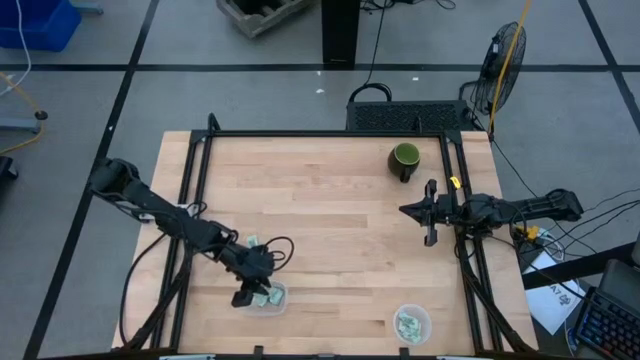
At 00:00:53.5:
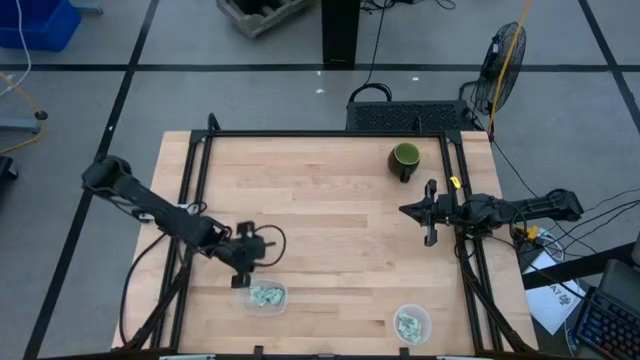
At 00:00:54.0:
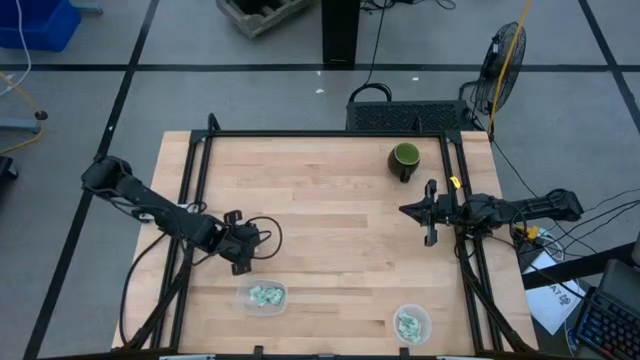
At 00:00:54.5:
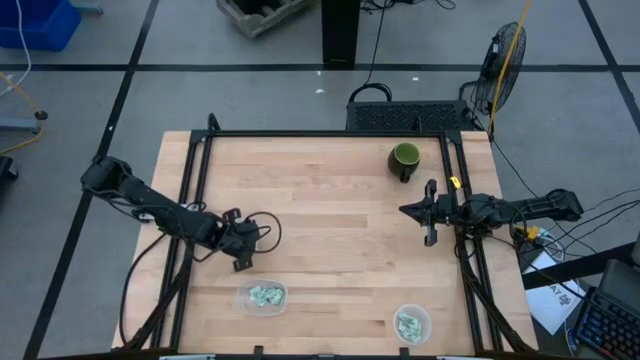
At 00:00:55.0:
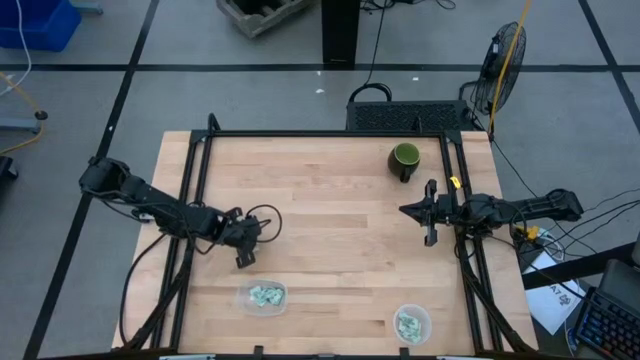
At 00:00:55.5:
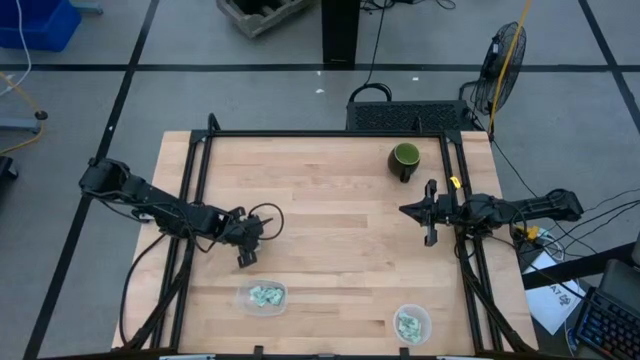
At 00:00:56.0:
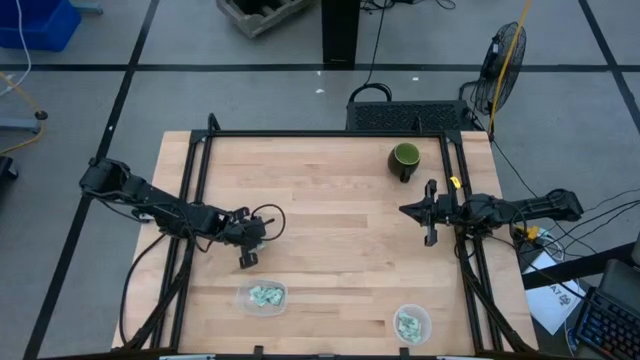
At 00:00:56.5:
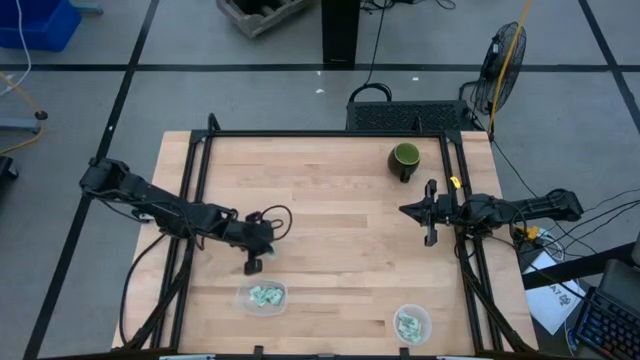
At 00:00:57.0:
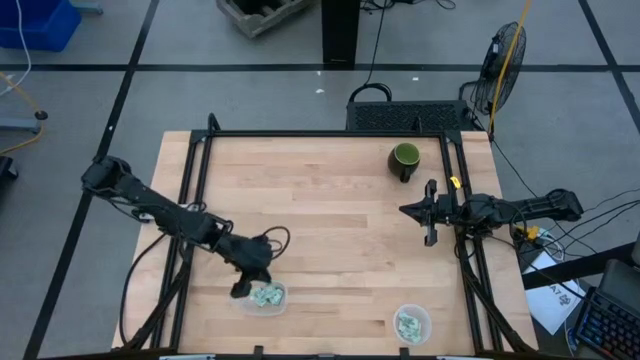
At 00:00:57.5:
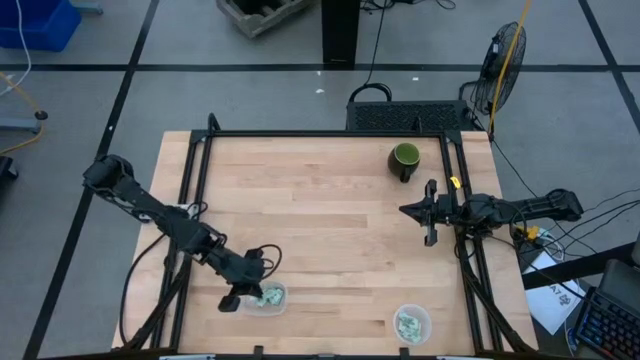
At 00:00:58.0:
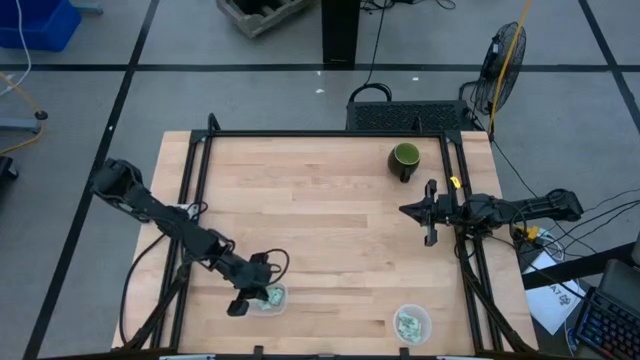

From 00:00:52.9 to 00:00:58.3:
Task: Pick and place Stevia / Truvia into bins
Put the stevia packet into the left transparent container

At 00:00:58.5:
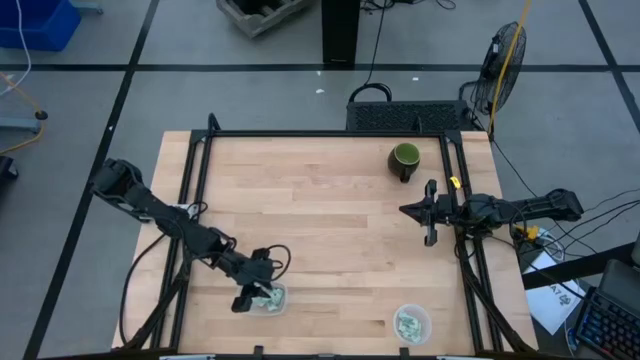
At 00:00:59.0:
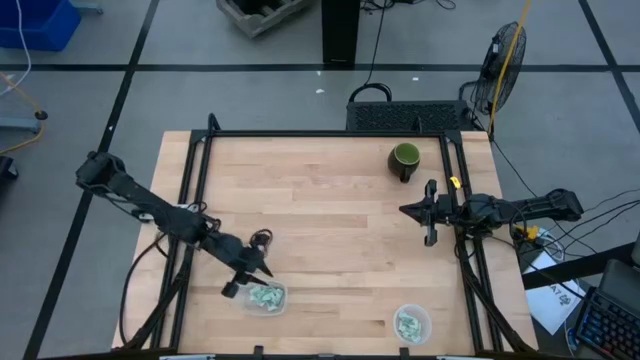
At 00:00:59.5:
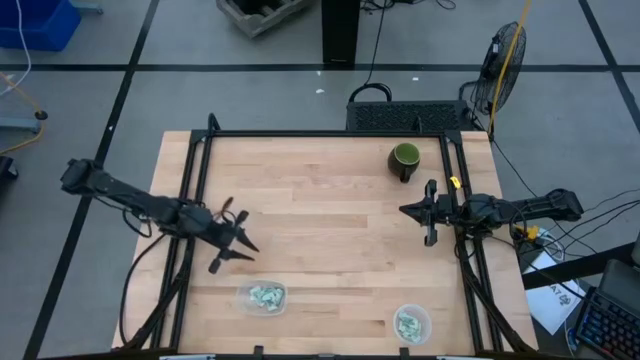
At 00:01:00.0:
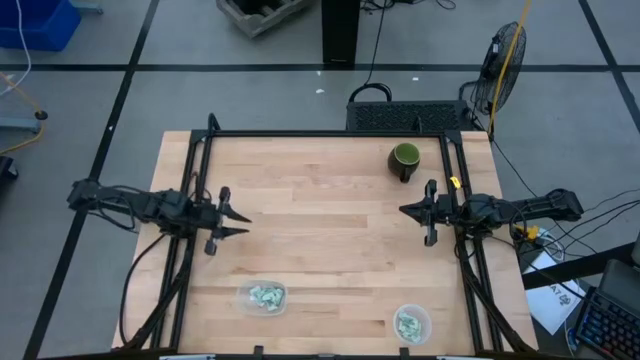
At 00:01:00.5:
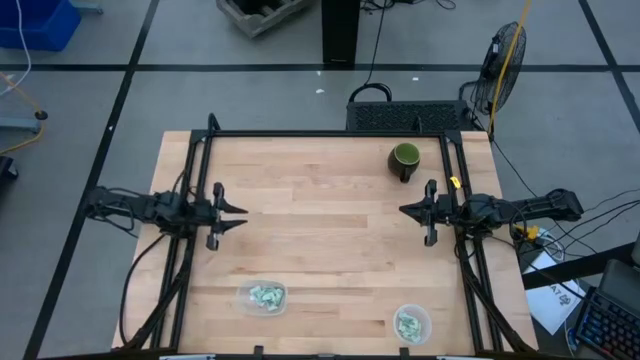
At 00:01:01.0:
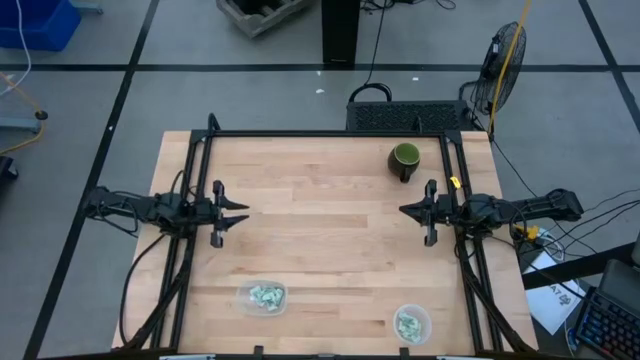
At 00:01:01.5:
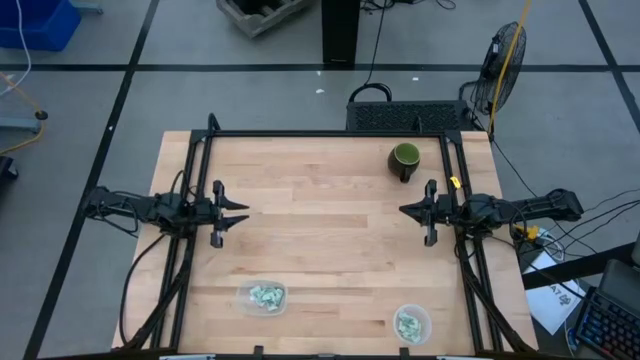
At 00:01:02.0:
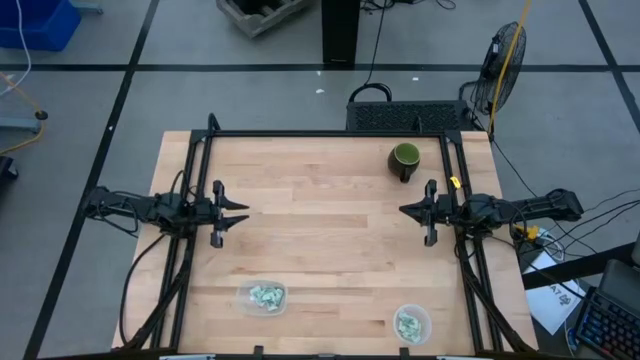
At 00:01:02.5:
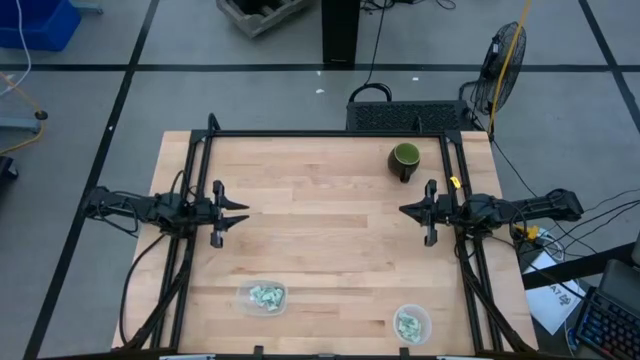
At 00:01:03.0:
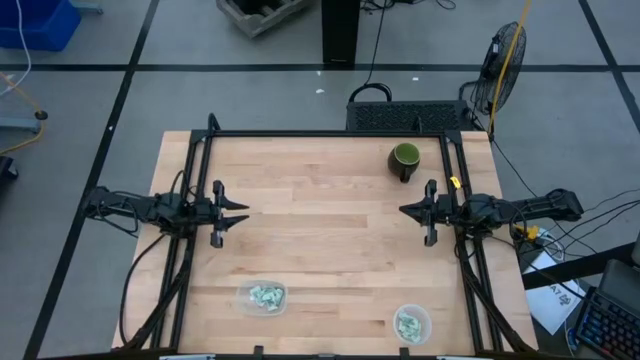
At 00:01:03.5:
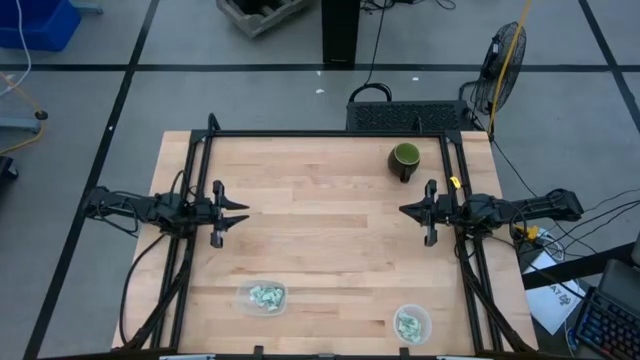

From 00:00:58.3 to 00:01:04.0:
Return to Home Position

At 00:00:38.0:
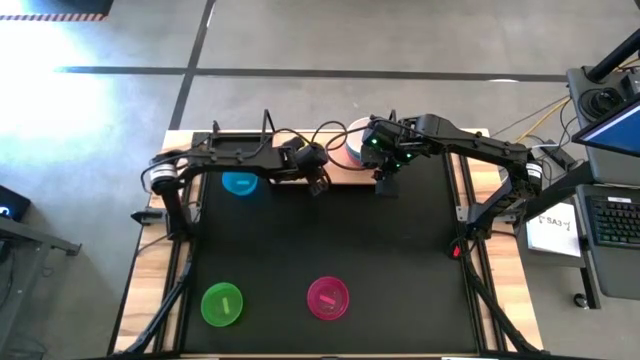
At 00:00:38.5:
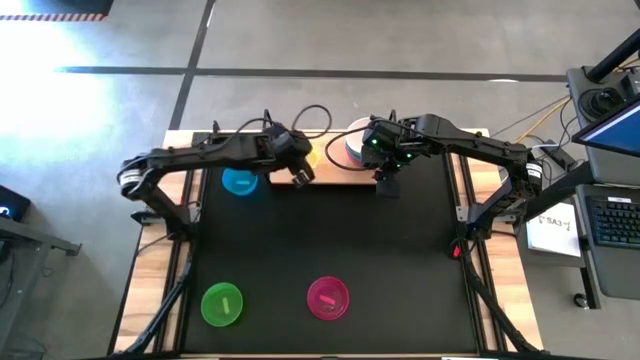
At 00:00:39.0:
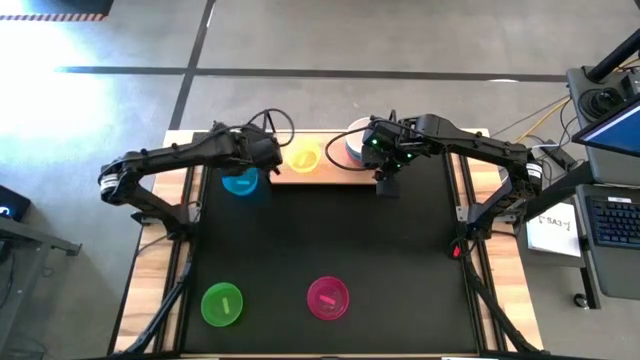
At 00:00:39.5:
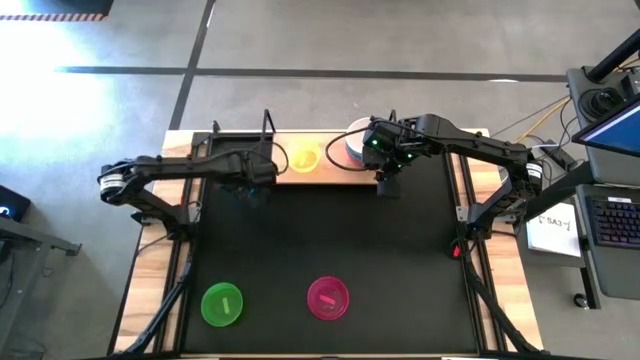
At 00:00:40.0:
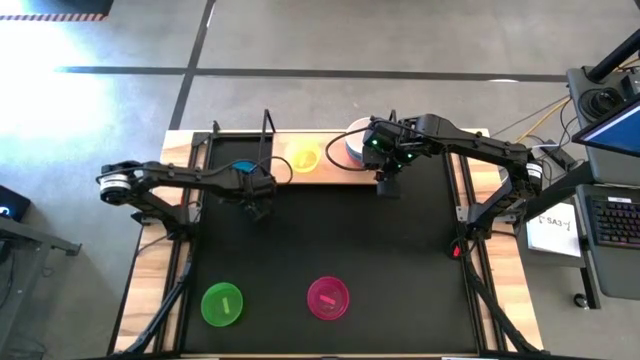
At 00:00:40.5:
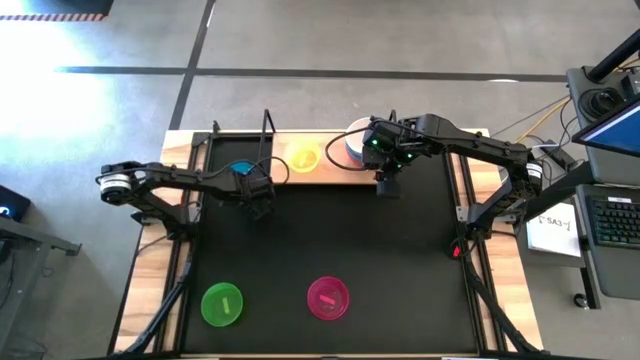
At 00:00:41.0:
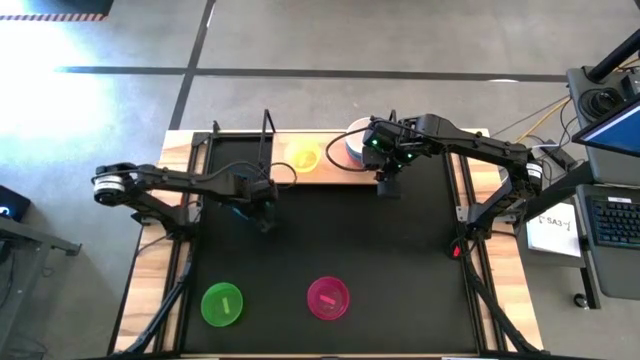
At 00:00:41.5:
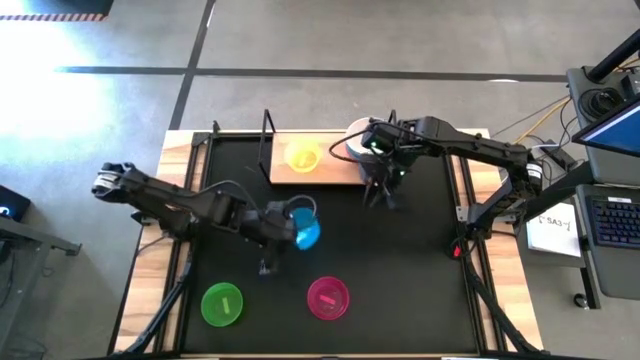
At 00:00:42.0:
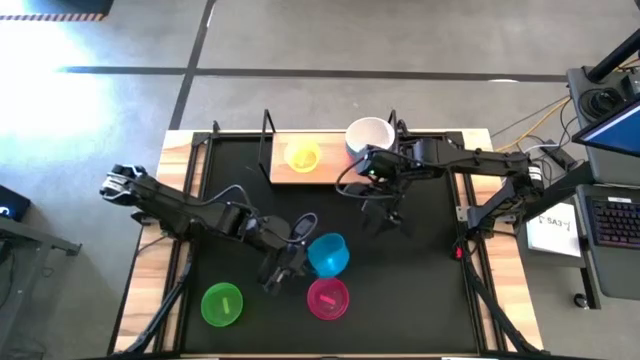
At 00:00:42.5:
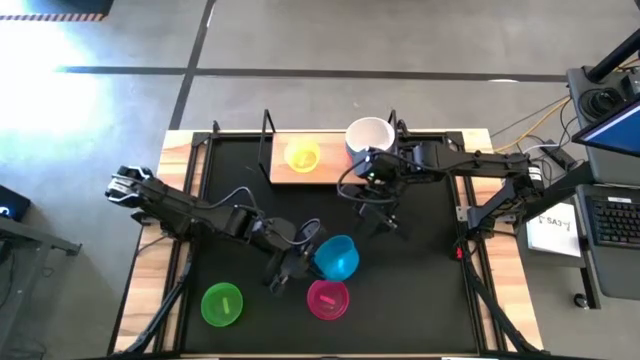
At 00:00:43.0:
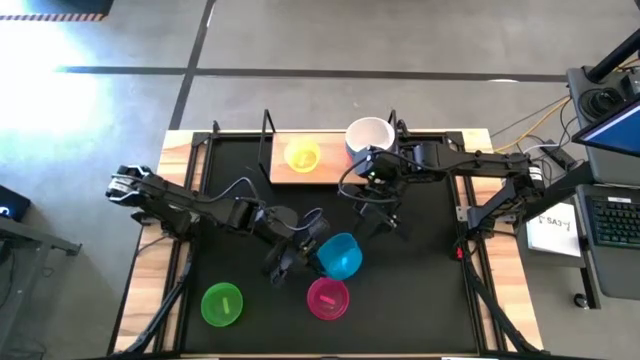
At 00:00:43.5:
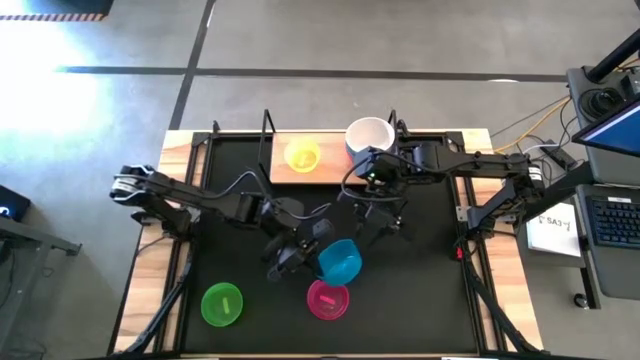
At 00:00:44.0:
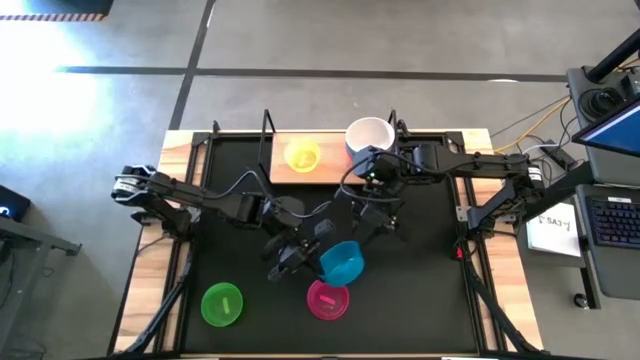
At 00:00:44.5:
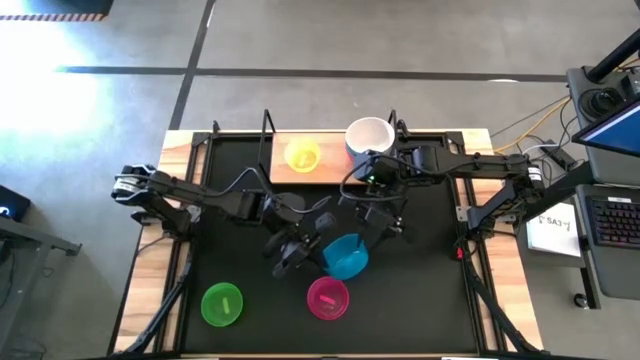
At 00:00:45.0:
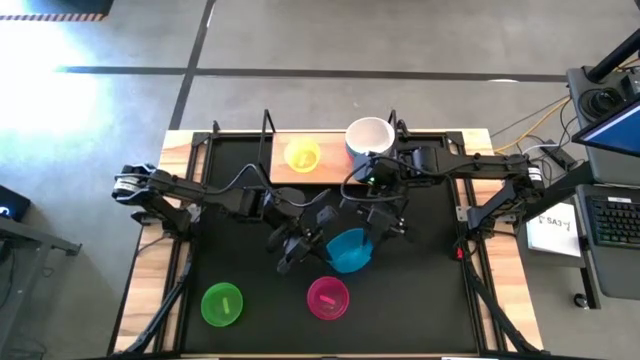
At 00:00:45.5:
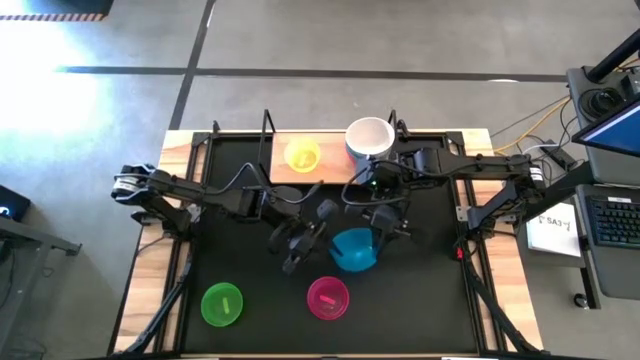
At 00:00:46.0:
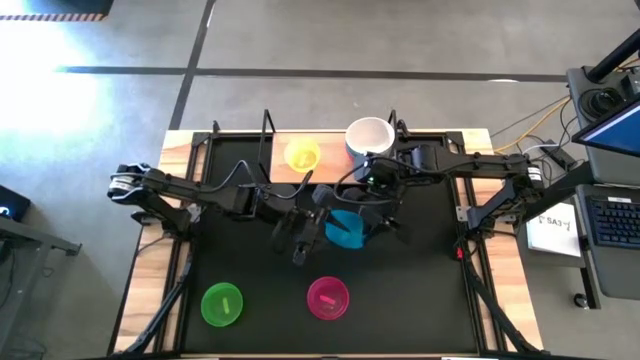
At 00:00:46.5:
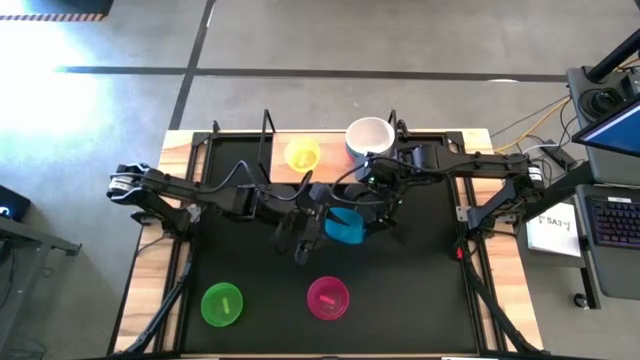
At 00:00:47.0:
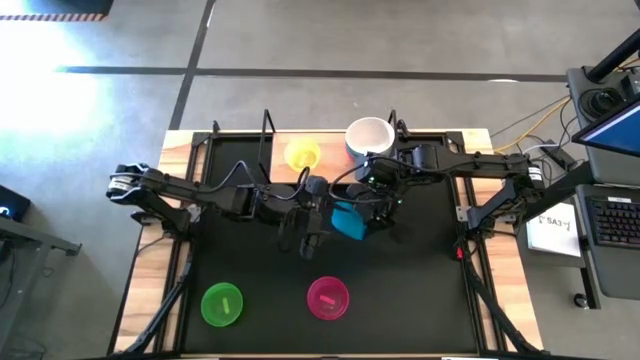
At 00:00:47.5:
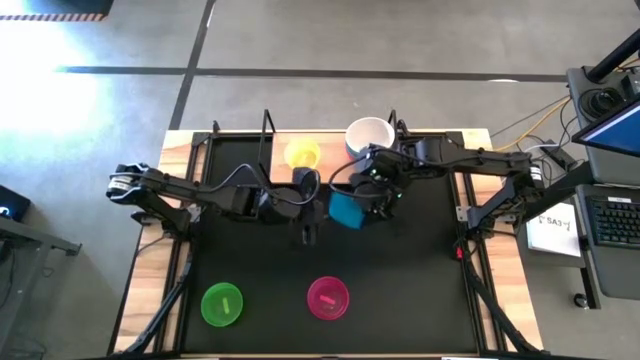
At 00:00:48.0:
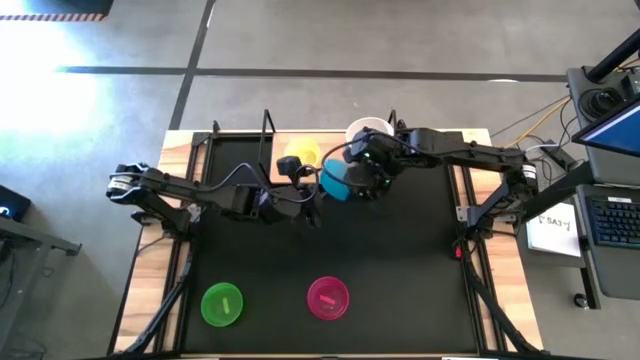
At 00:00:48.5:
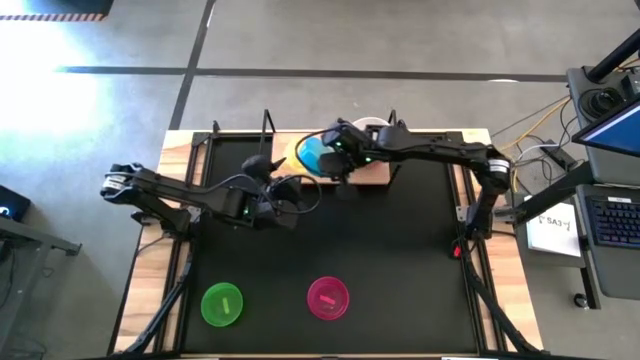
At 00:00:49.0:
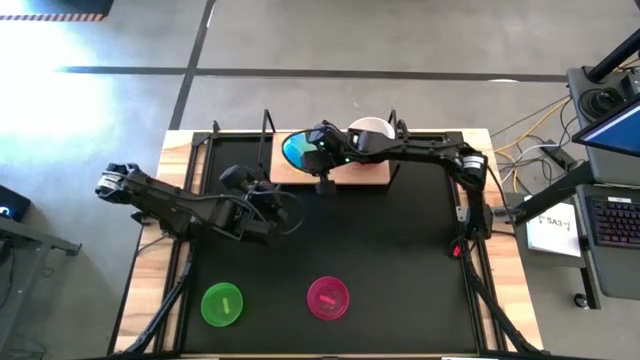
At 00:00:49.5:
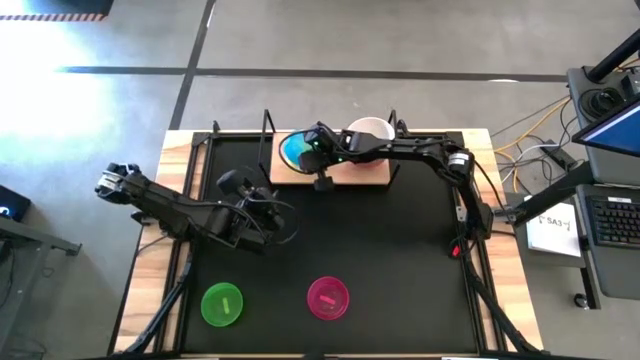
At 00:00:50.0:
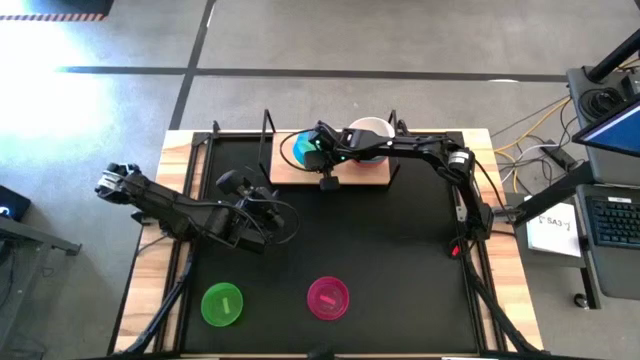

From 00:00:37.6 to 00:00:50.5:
Task: Place and stack bowls onto a shelf
Stack the transparent blue bowl on top of the transparent yellow bowl
